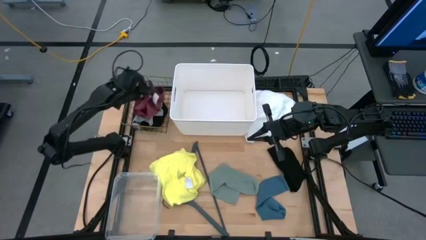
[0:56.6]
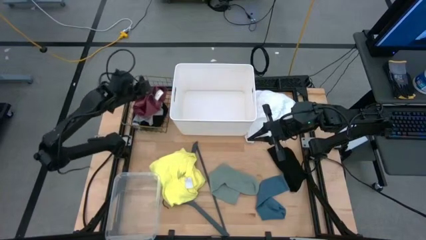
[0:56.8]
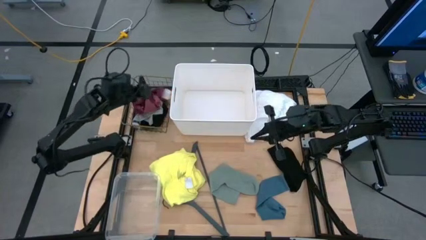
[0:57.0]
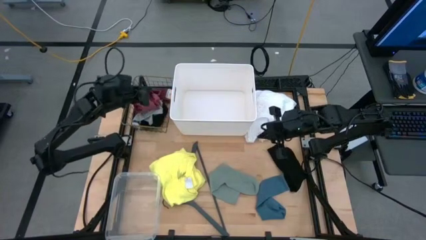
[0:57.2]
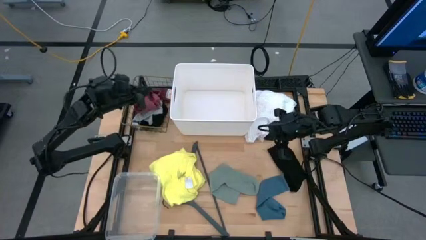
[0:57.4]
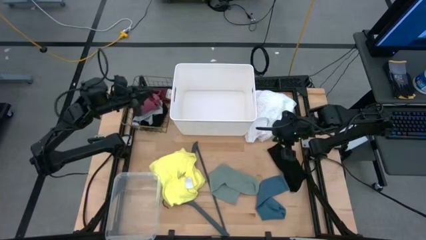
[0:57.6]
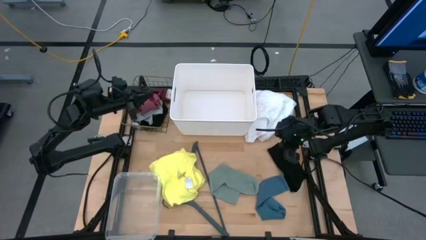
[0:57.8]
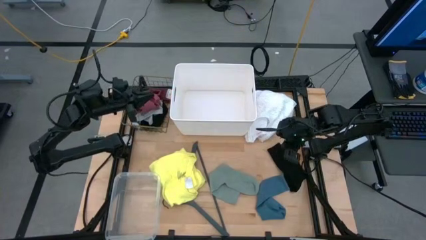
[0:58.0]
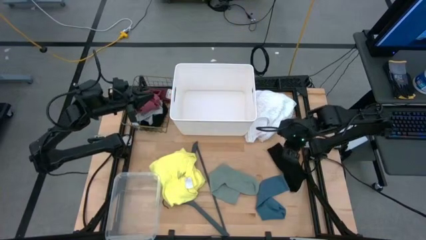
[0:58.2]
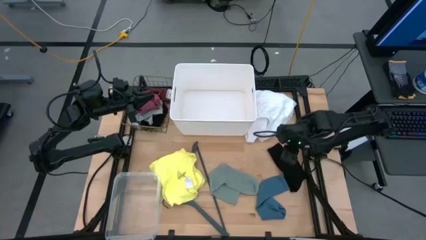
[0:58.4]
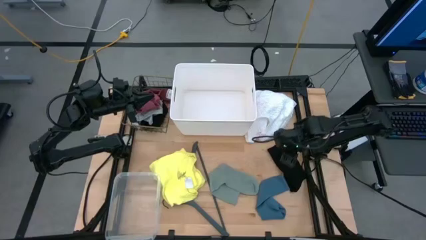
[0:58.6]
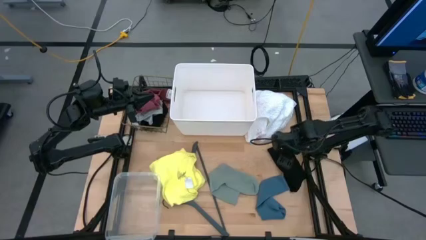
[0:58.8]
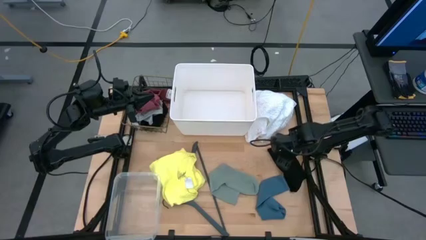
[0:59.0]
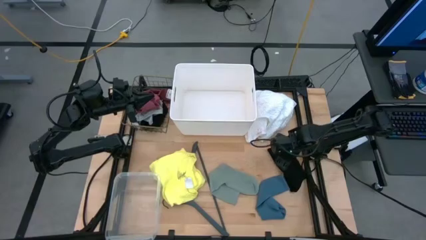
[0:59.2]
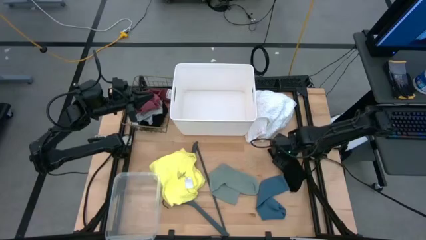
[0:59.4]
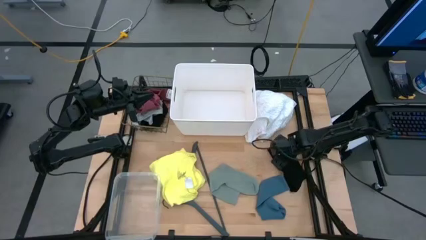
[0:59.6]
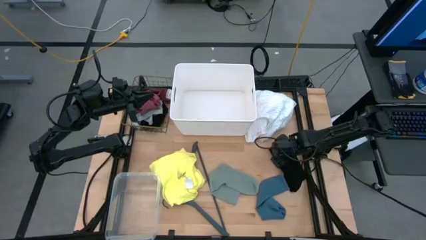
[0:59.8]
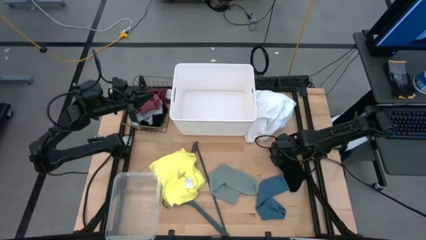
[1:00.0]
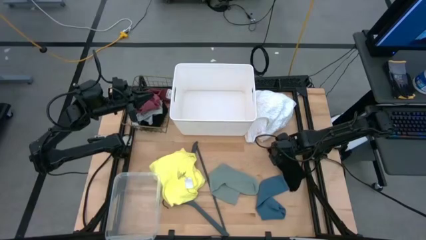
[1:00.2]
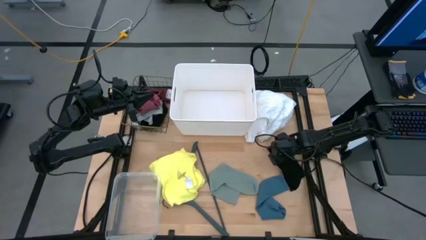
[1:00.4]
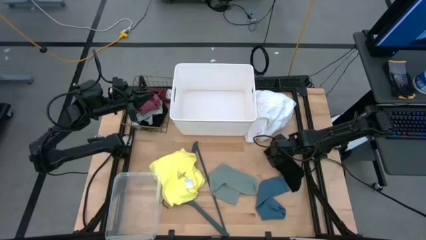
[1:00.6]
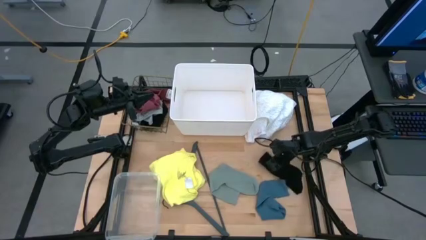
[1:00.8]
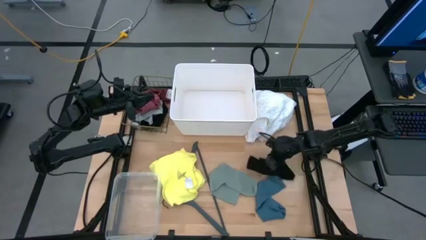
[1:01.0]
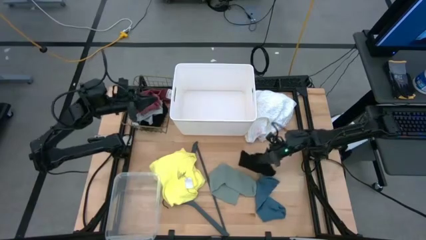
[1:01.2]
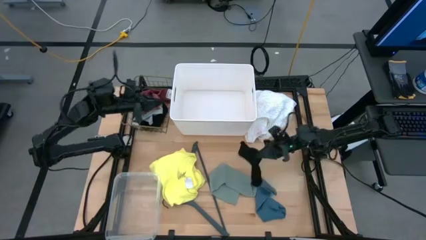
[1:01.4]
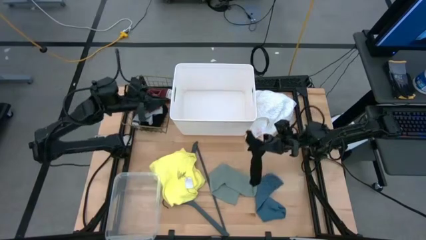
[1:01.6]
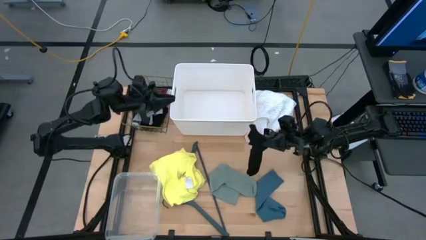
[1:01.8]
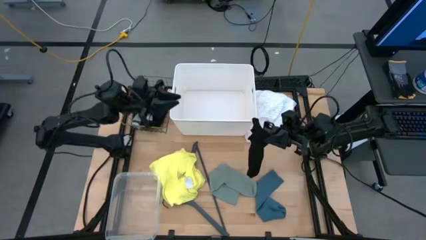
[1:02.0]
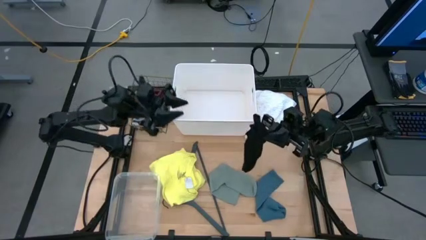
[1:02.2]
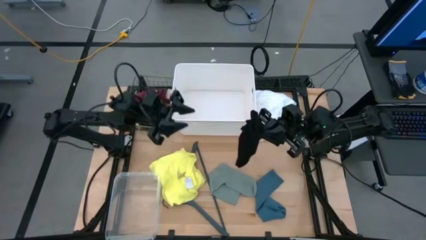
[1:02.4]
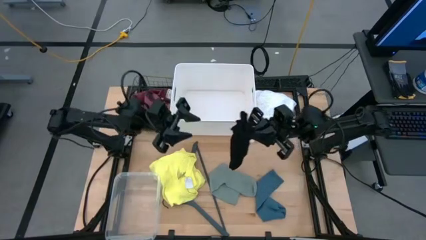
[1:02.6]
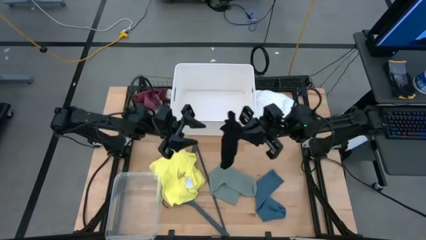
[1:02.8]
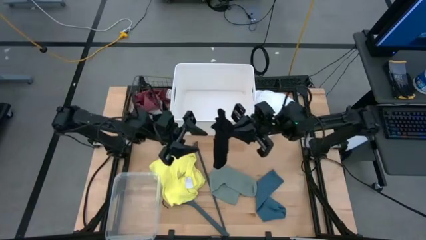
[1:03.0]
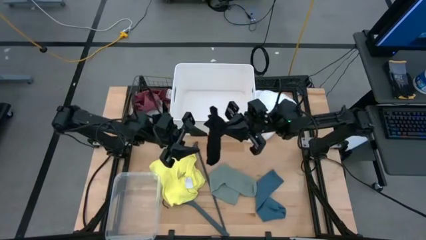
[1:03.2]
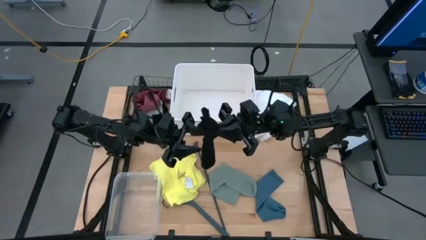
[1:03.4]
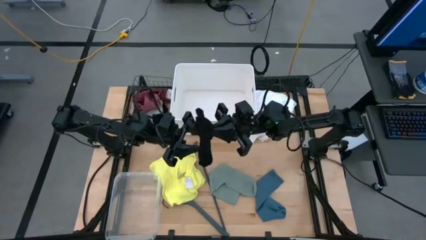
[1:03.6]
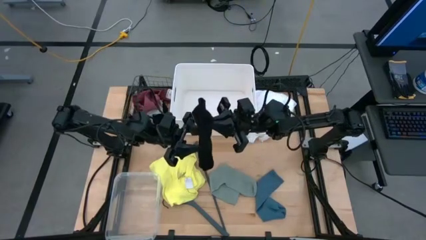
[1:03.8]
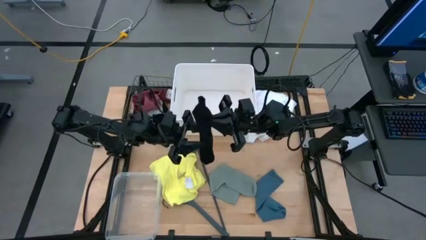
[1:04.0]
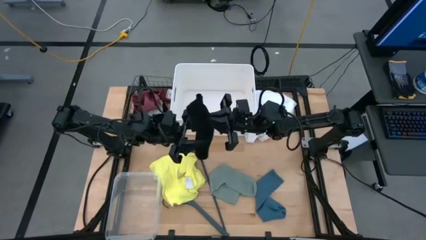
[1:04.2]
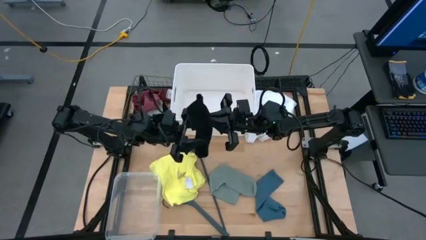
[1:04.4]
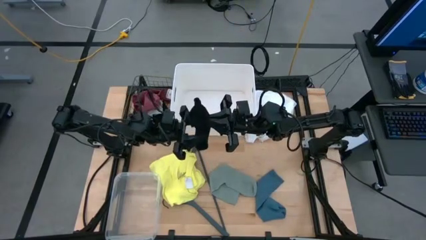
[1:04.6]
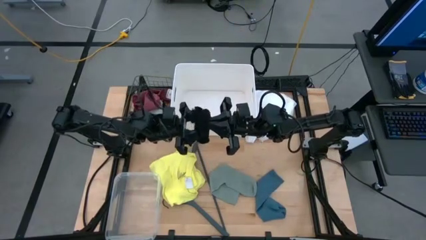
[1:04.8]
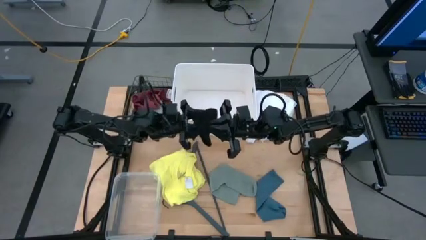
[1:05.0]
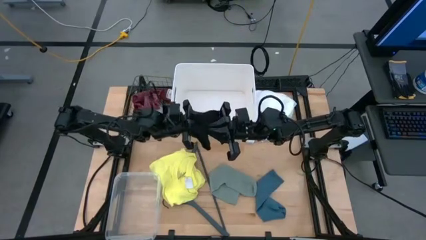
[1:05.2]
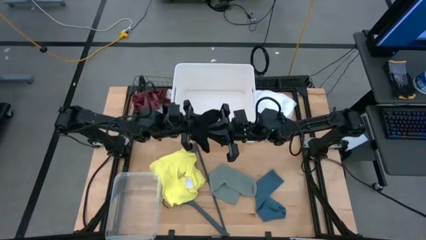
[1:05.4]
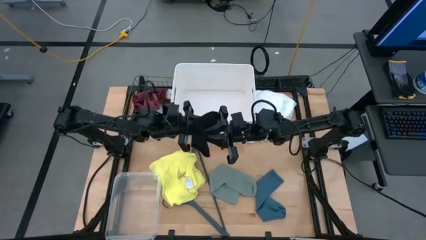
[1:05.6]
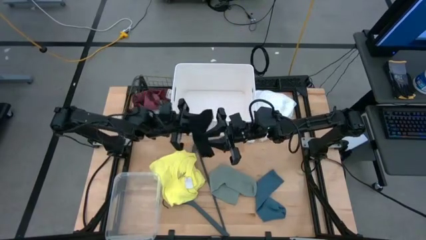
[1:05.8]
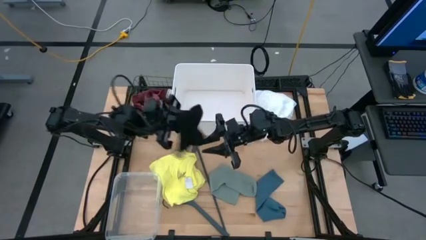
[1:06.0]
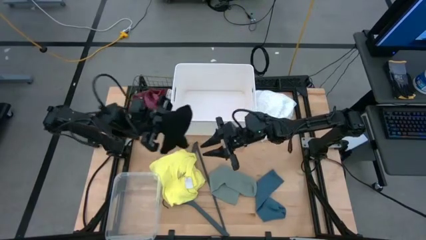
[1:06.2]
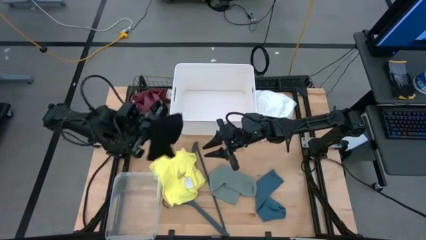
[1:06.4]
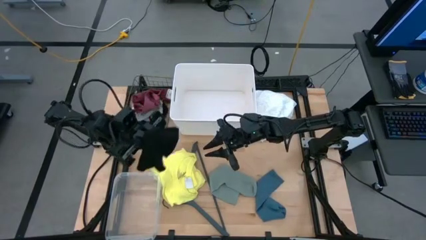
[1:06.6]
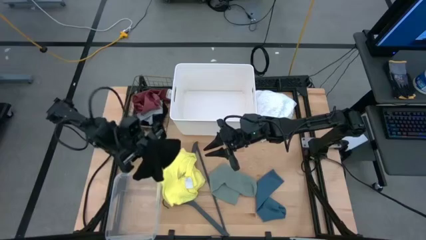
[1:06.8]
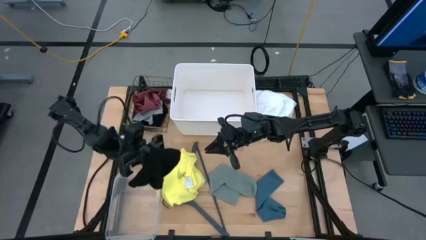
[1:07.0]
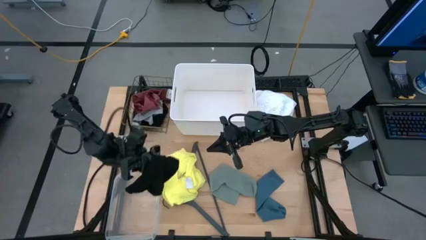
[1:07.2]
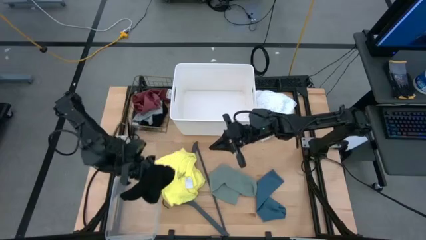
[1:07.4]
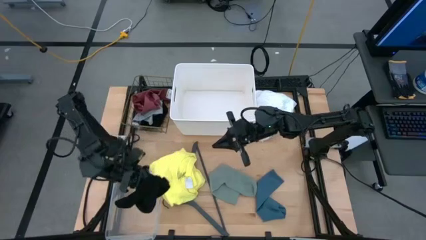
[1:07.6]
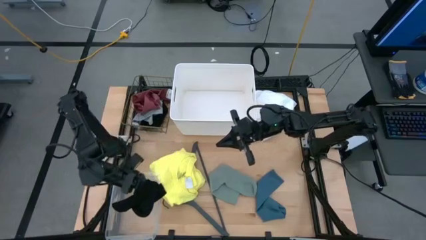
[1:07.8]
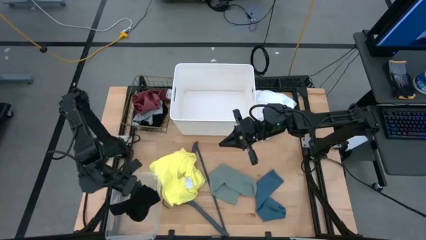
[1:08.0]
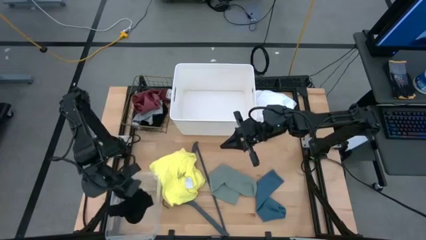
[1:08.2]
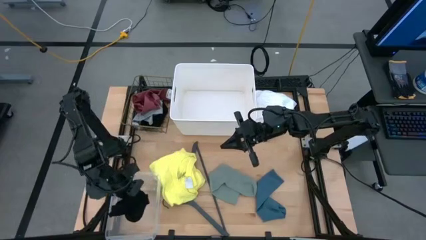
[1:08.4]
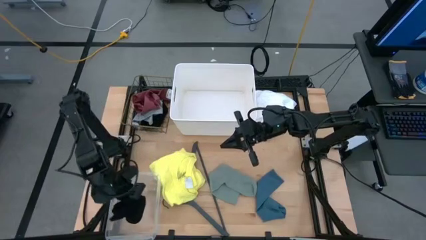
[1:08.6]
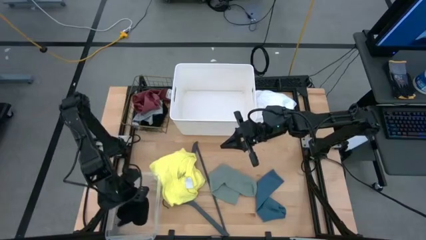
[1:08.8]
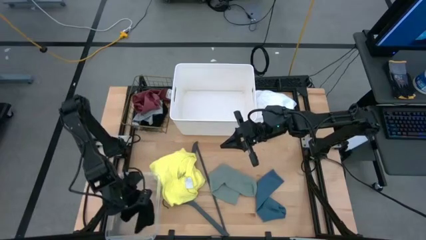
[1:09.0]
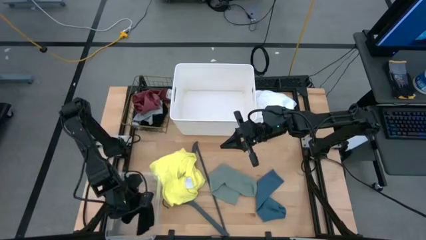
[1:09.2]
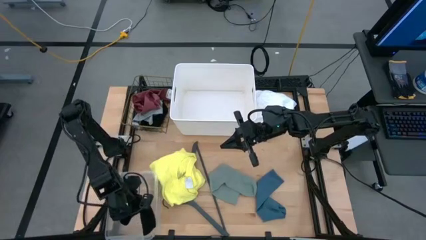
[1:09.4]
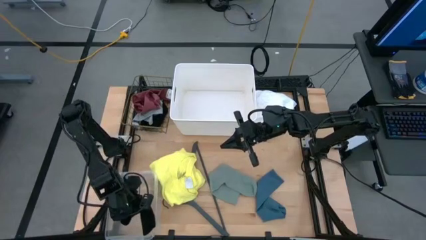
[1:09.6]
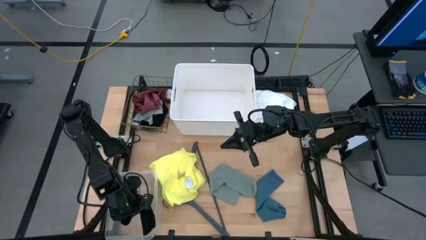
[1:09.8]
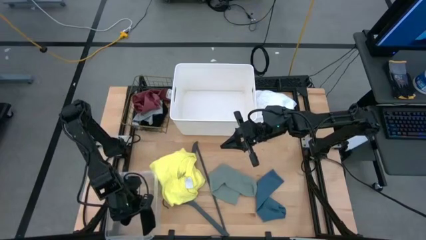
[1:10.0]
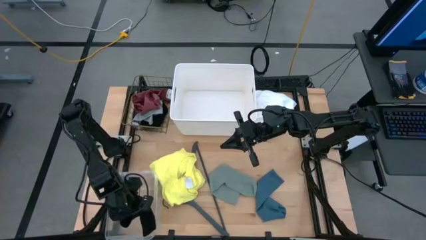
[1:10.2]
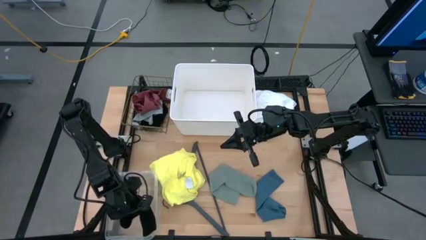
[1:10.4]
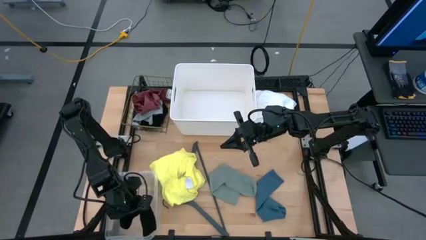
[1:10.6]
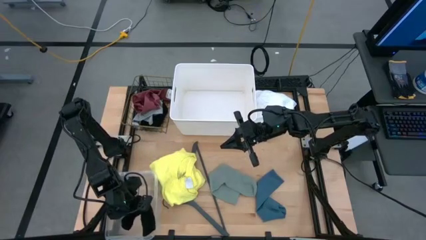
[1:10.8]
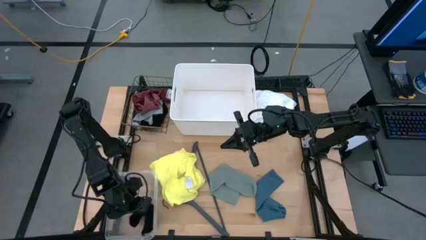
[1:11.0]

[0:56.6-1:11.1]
Task: Pick & Place Cloths
Put the black sock into the transparent bin

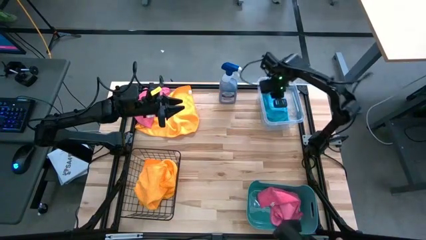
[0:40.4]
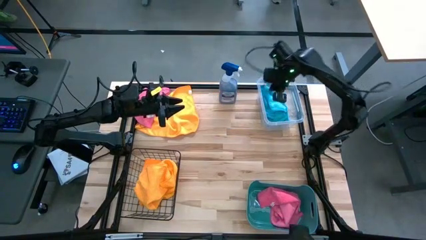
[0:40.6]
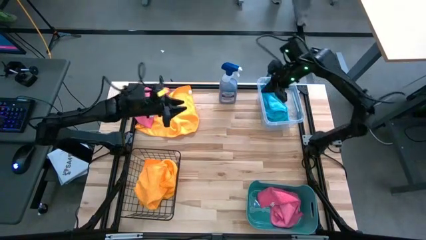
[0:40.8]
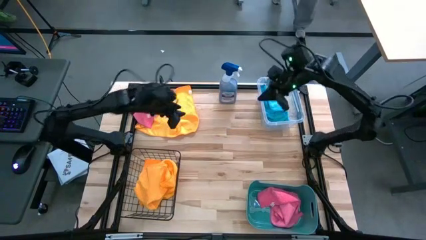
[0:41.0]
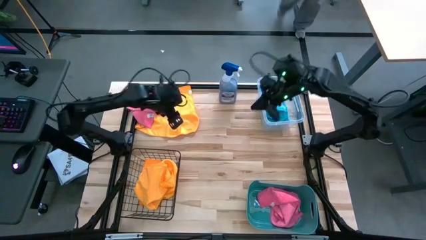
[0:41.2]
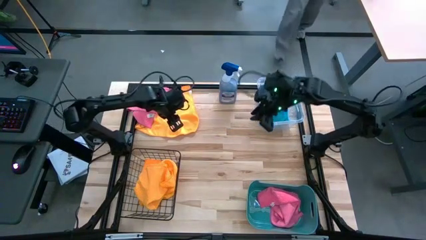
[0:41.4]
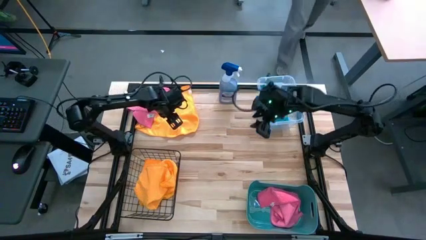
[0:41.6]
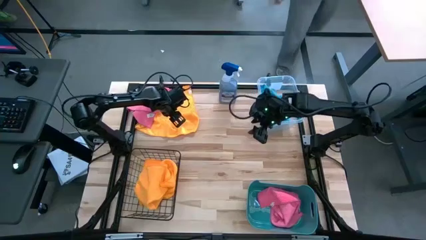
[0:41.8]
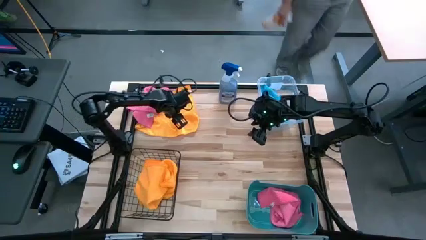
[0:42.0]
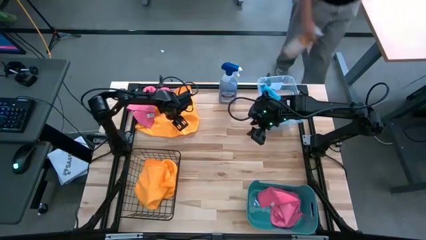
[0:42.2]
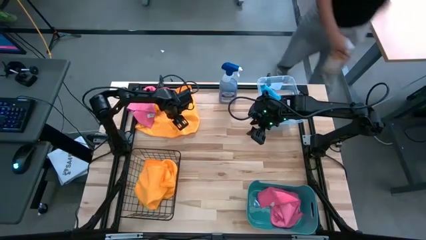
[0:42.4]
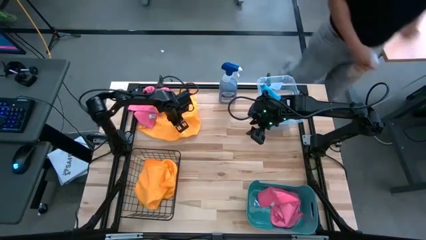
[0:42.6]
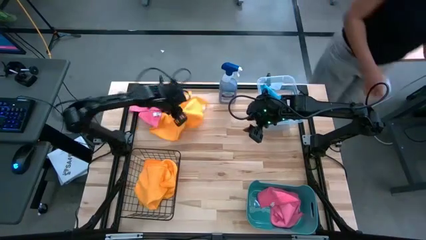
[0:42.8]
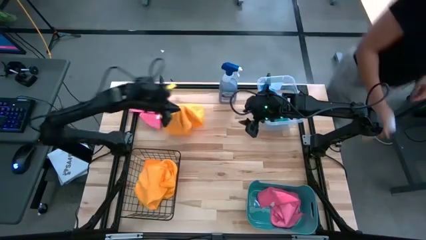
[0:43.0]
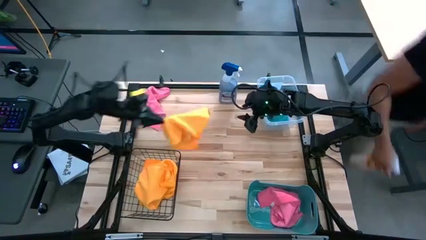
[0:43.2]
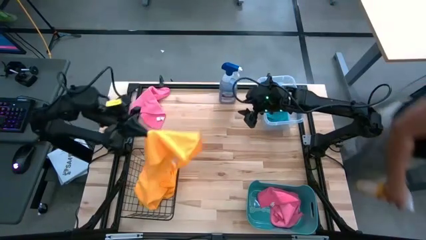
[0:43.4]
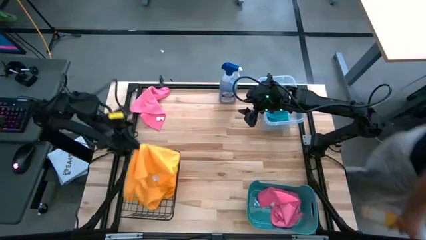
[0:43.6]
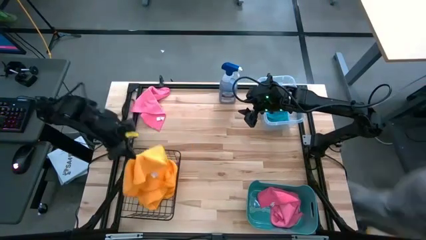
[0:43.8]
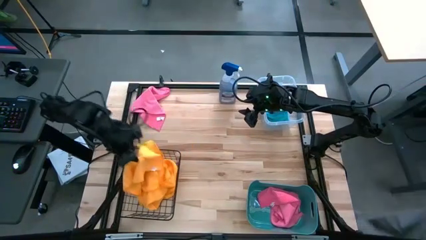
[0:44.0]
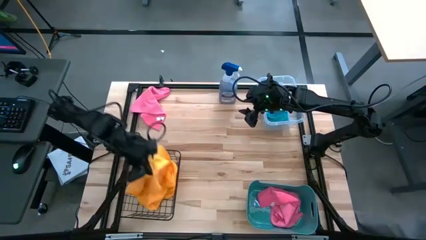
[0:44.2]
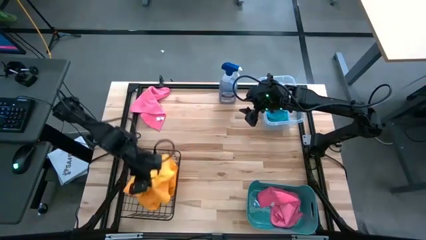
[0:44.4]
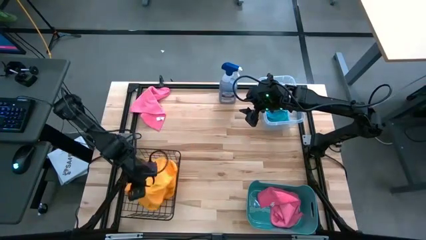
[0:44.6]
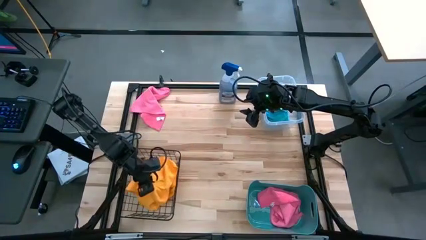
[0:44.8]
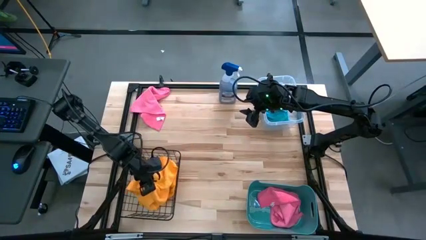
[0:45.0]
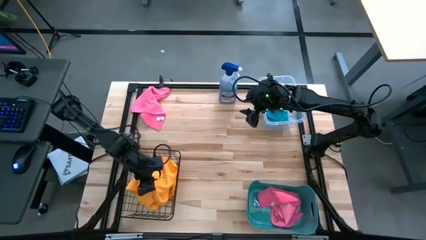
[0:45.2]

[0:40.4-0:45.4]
Task: Sort microfiber towel by color & place in baskets
Put the orange microfiber towel into the black wire basket
